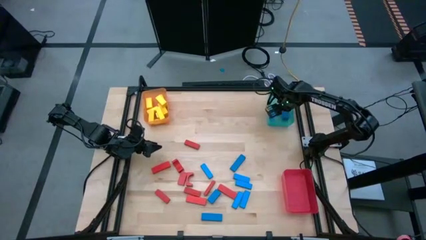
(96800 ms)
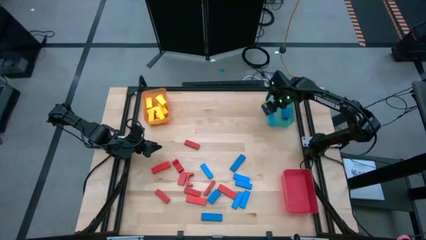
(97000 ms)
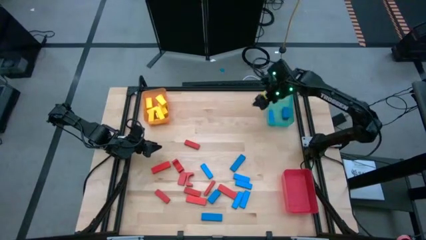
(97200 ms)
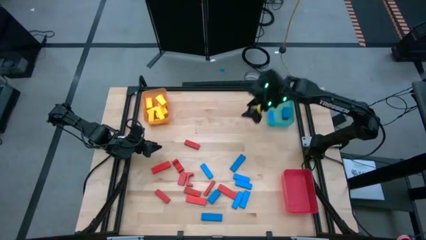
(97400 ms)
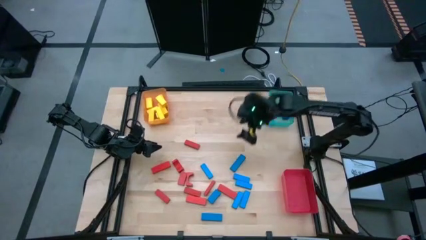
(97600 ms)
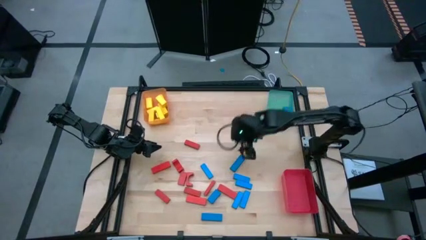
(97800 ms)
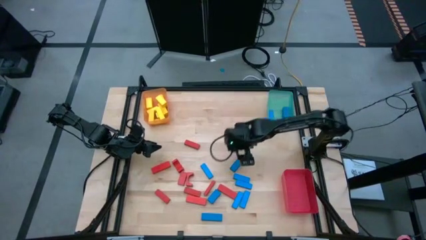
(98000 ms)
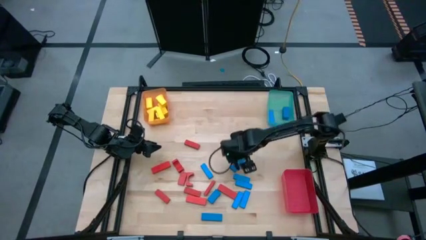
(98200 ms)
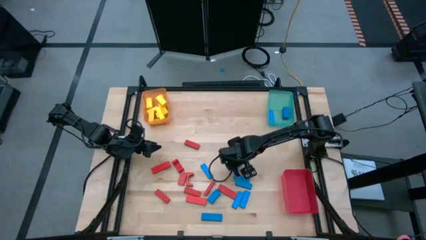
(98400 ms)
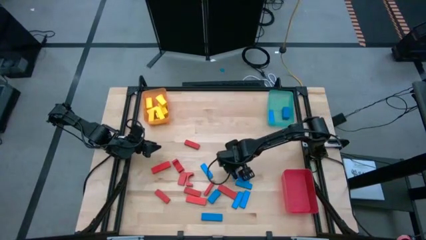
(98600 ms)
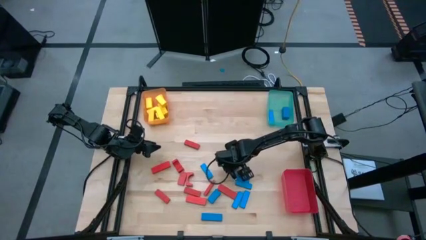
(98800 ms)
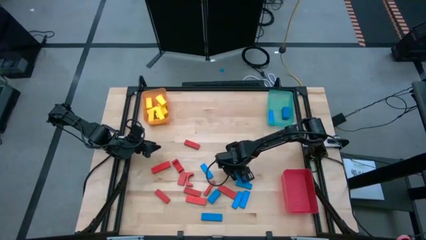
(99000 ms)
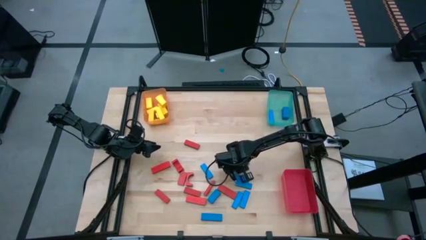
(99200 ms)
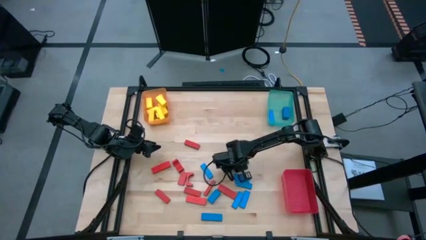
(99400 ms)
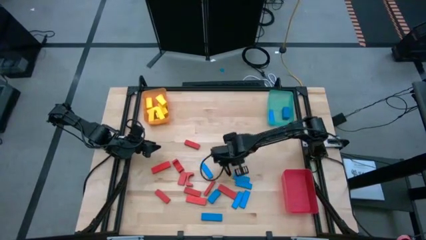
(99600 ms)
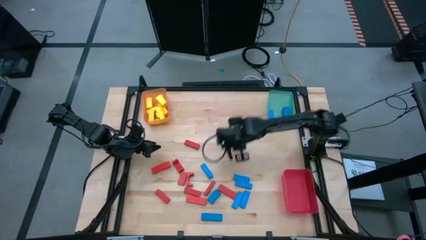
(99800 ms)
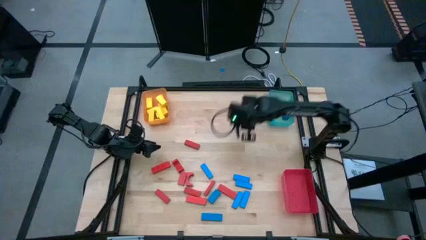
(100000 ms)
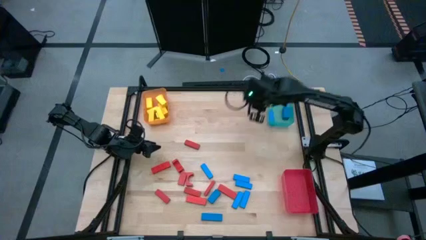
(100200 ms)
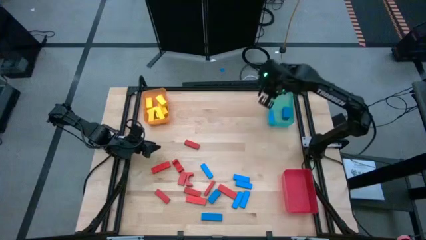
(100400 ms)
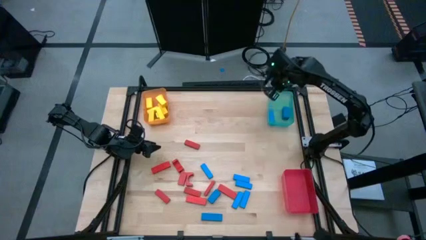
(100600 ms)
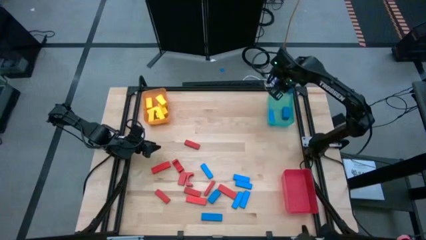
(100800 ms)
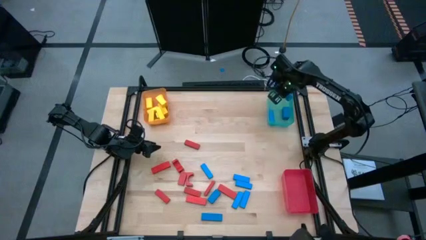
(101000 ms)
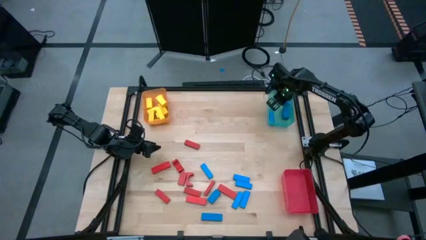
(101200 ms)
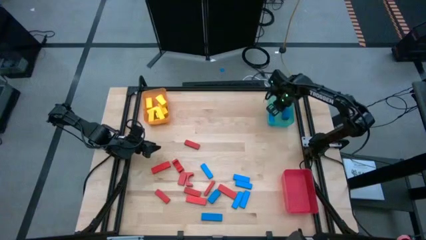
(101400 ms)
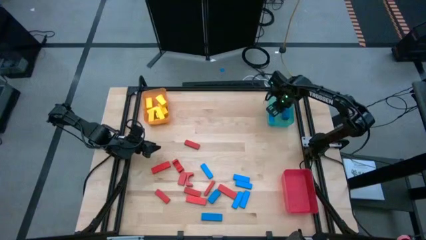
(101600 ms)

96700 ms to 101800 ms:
Task: Sort blocks
Put the blue block into the blue bin

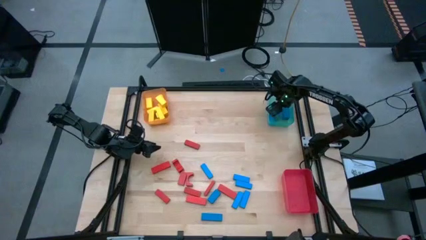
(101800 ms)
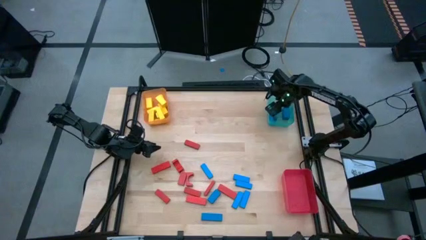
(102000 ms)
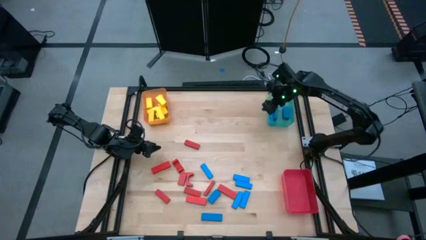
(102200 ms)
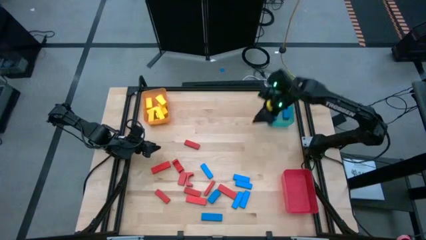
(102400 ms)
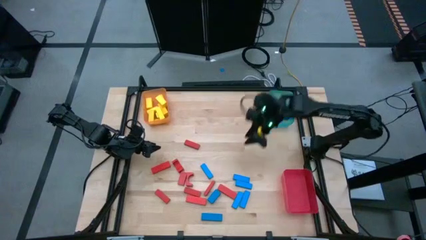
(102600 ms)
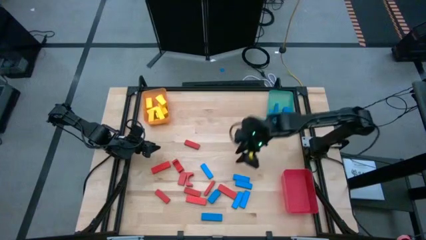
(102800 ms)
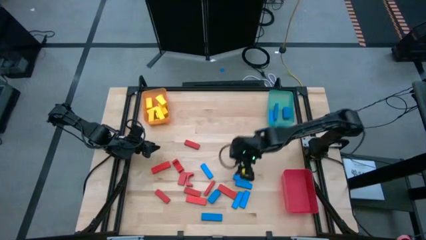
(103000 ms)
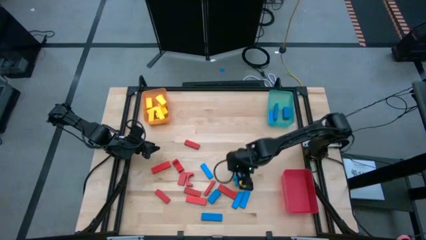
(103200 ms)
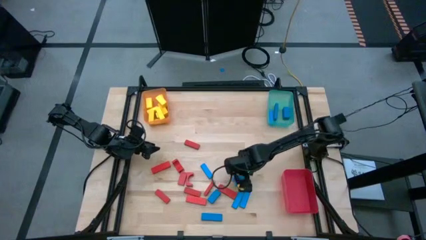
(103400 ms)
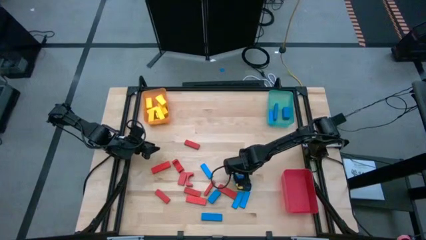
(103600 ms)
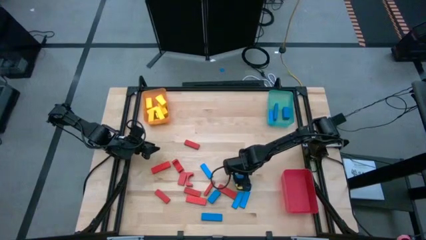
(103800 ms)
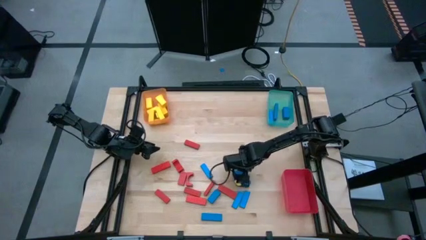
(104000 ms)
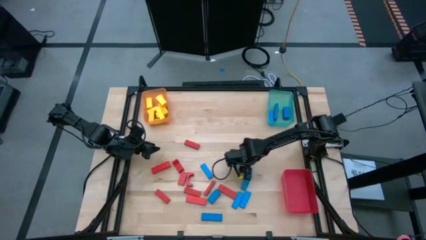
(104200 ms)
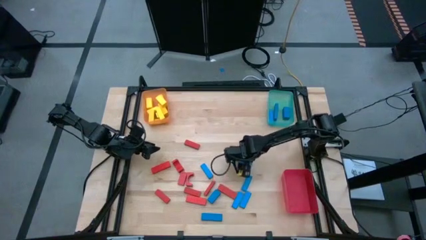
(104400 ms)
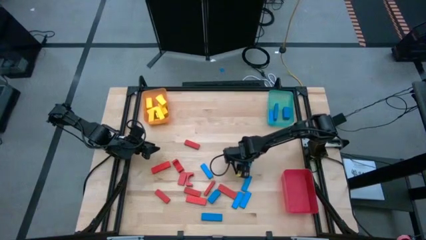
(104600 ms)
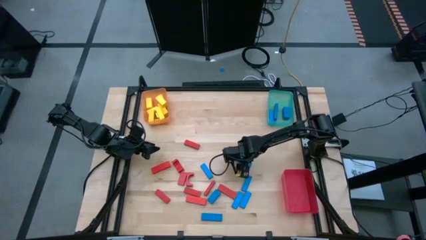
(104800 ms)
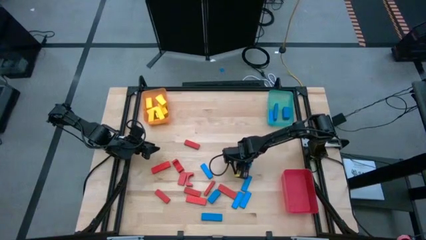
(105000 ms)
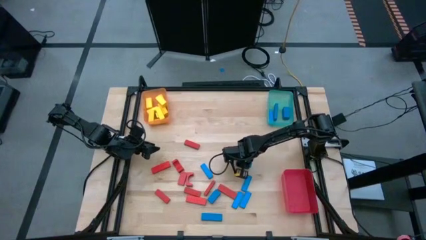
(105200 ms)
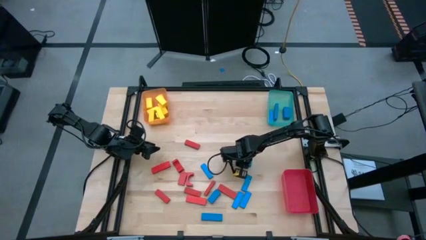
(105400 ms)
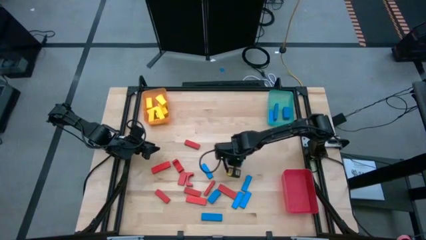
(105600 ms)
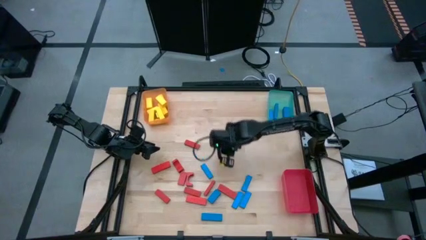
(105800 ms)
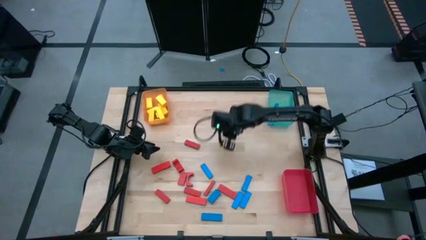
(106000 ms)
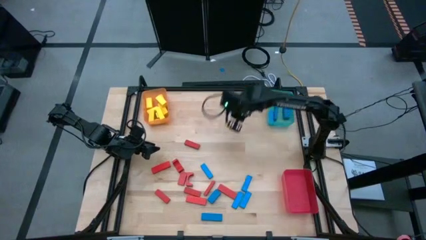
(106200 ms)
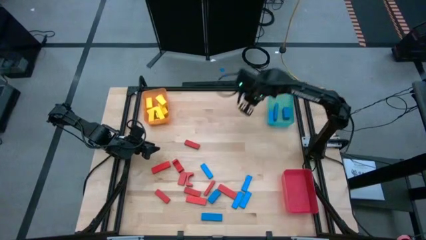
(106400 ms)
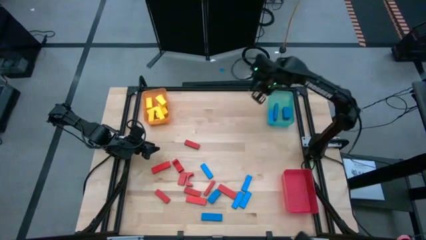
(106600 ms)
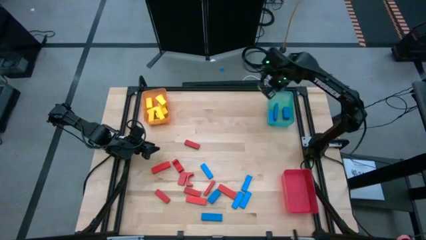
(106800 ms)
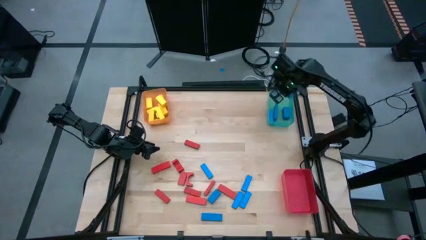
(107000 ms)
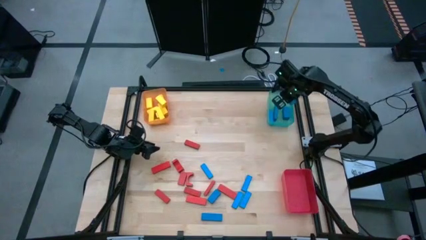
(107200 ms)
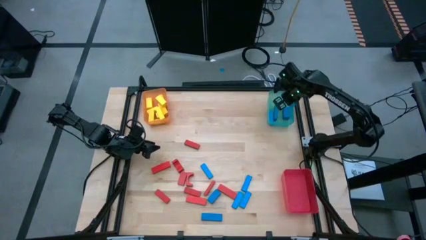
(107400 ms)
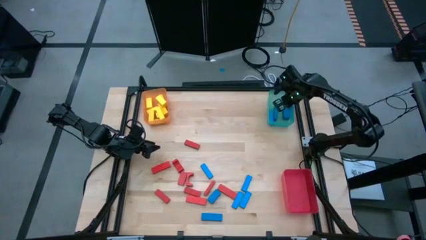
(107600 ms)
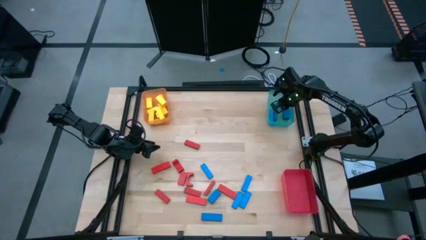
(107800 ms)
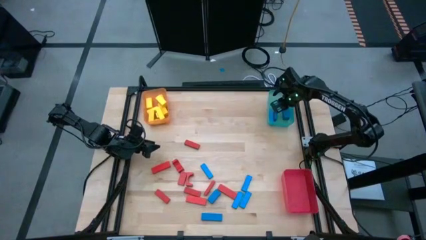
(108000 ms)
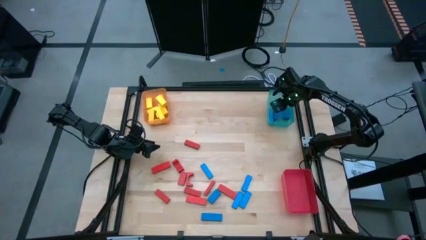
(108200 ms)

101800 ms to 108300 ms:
Put the blue block into the blue bin

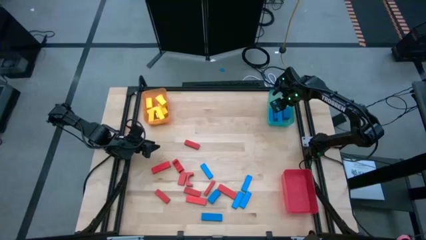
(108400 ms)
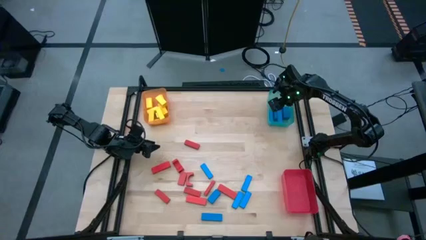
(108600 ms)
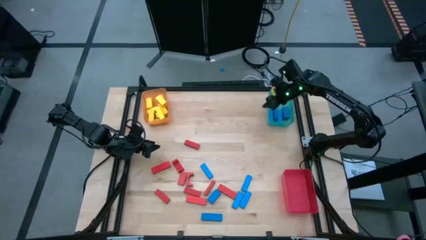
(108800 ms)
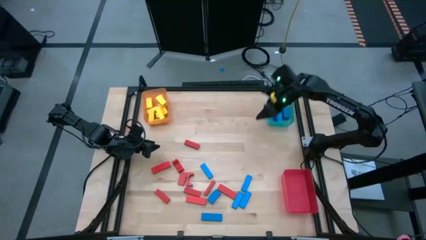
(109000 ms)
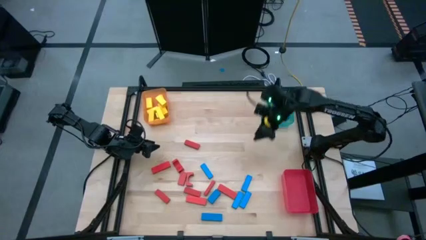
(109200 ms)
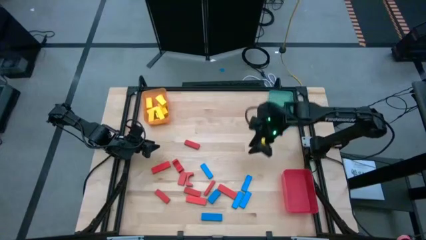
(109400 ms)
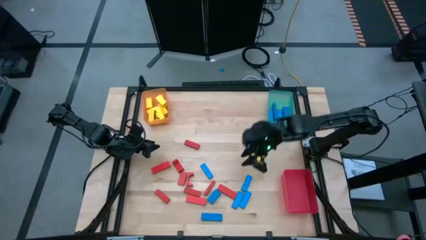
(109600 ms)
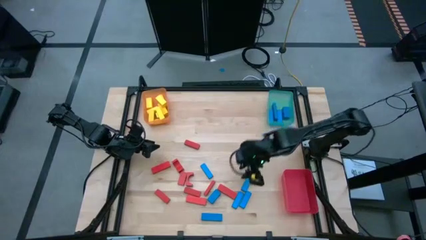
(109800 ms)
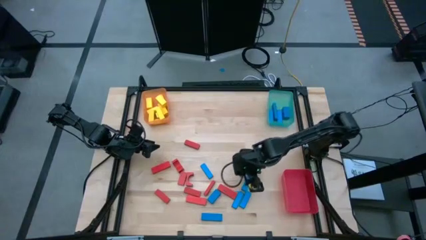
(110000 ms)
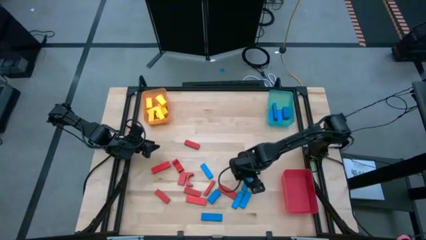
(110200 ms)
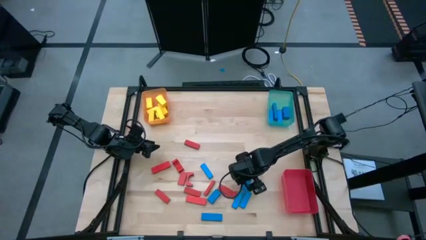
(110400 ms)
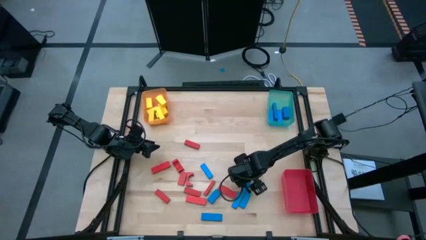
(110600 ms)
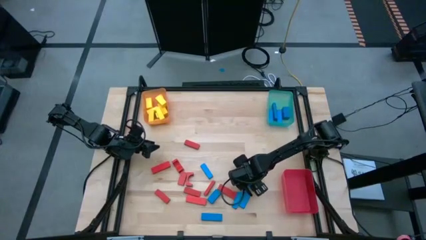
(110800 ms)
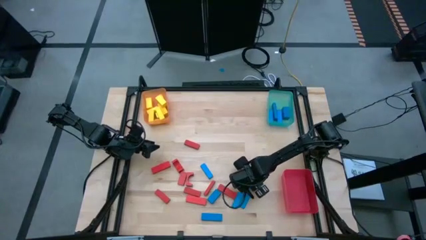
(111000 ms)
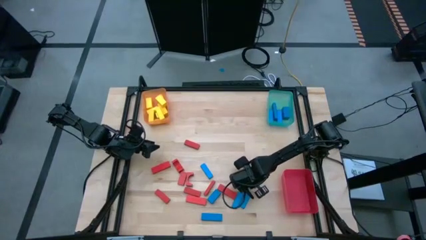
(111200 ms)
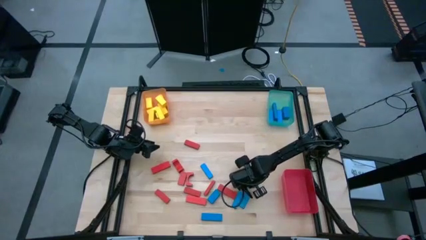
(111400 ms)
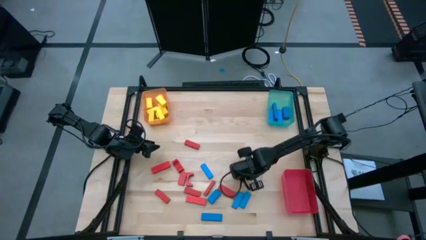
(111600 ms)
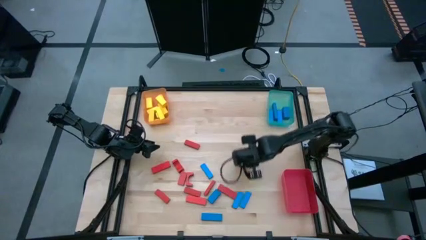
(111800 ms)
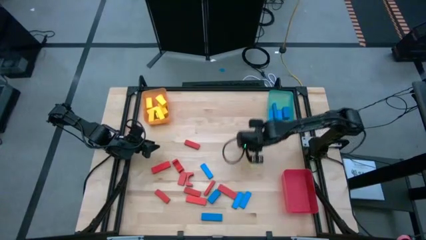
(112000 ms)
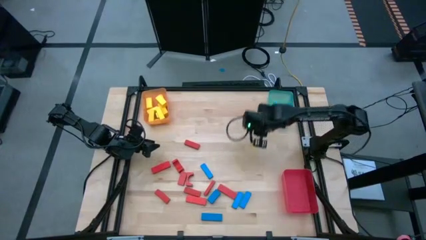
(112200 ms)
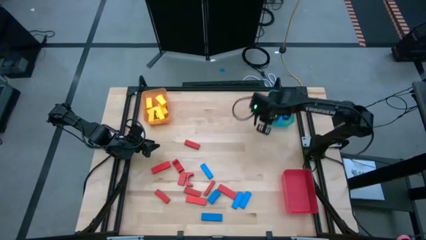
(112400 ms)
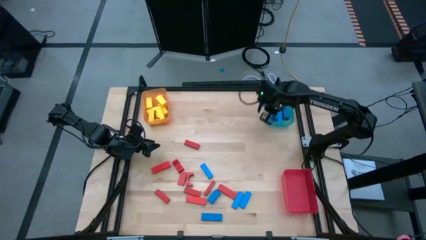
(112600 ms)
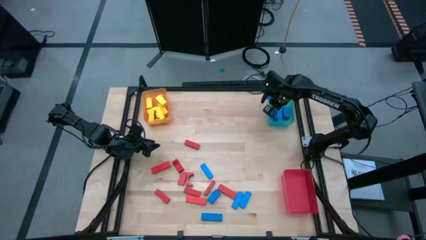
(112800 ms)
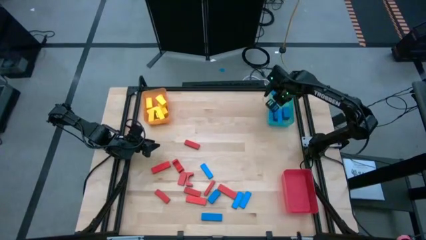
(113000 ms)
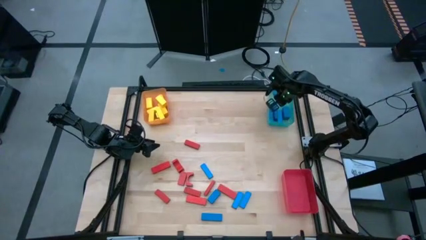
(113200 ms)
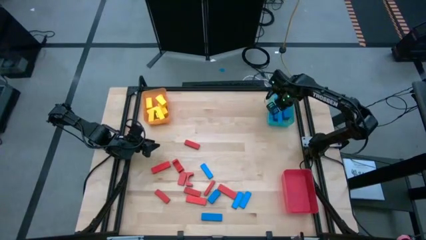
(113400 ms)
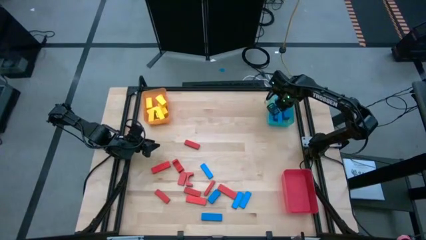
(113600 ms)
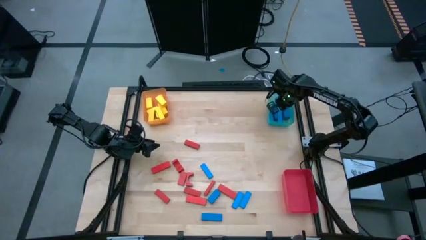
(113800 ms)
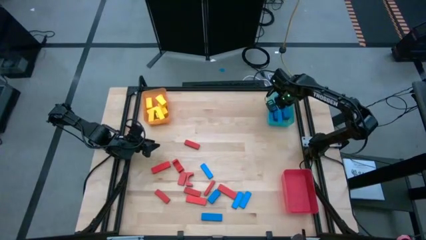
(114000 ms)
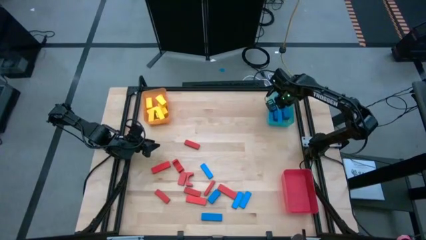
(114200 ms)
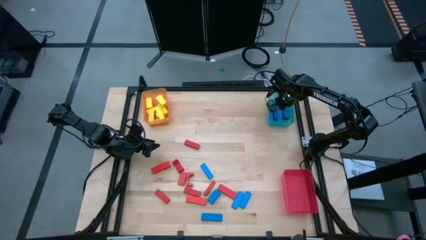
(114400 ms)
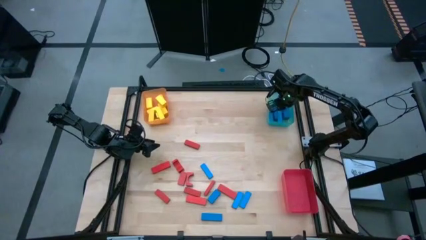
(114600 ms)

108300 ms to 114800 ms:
Put the blue block into the blue bin
